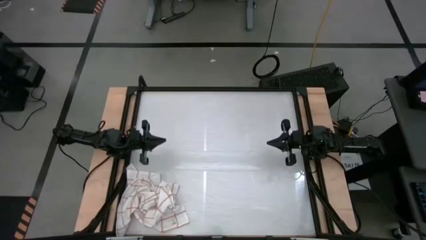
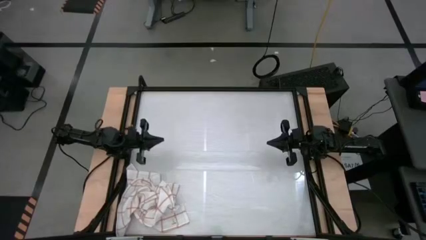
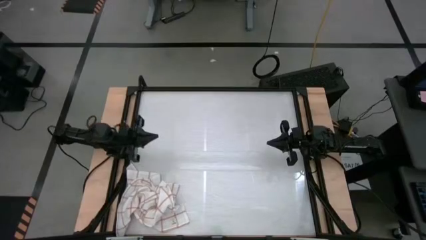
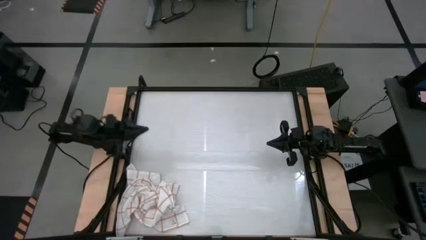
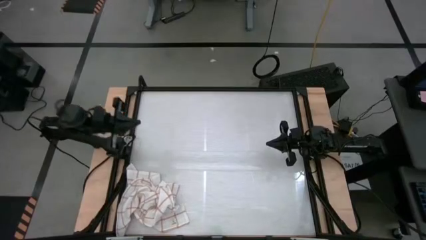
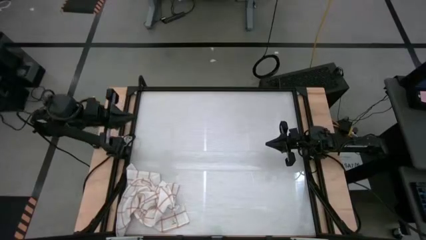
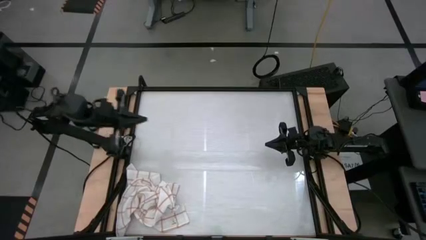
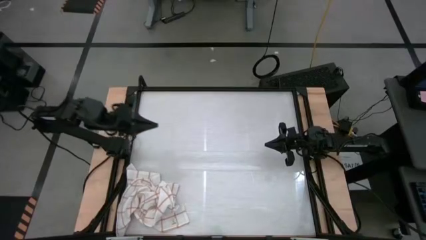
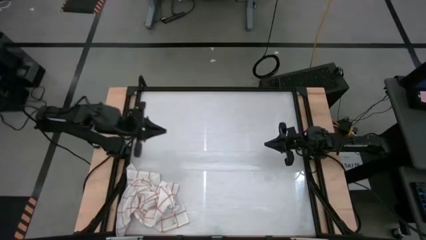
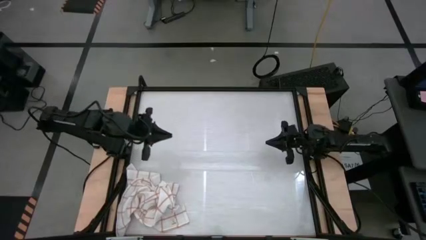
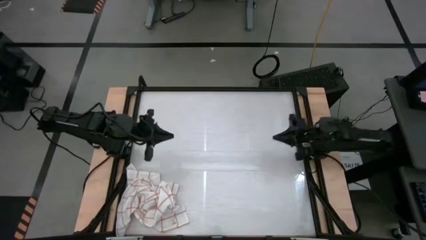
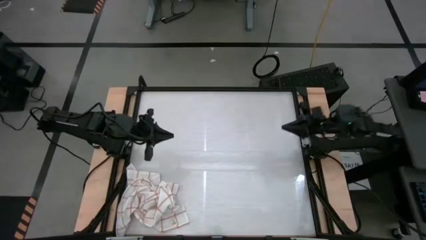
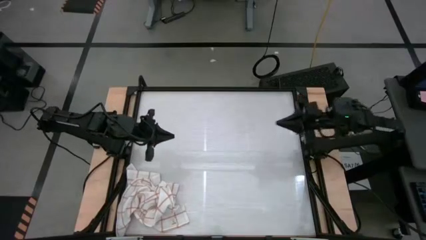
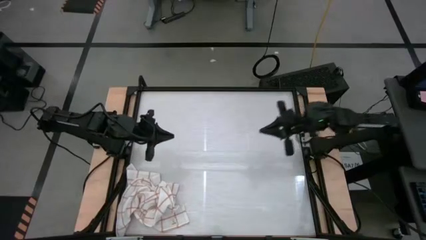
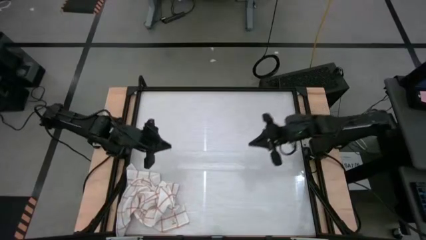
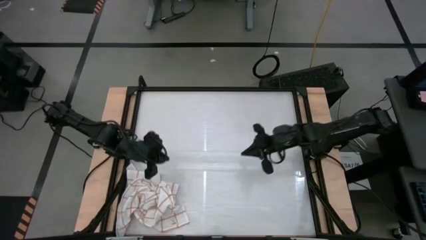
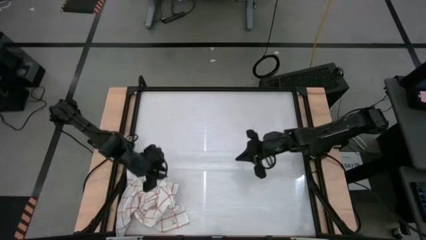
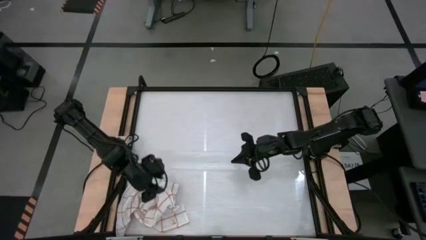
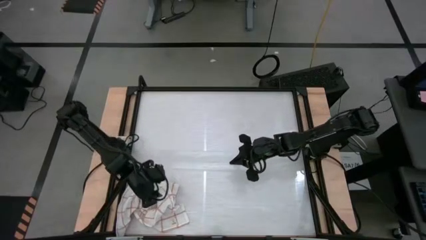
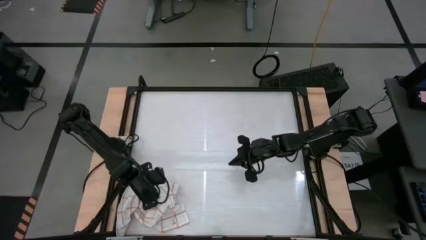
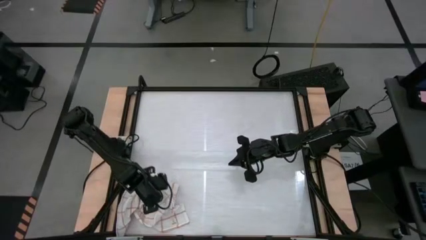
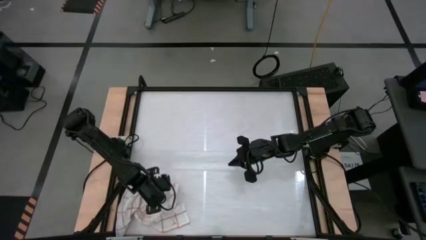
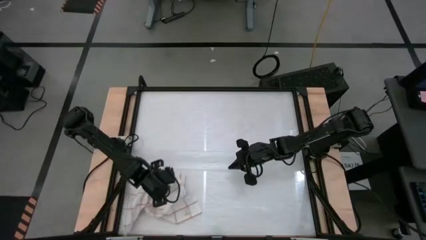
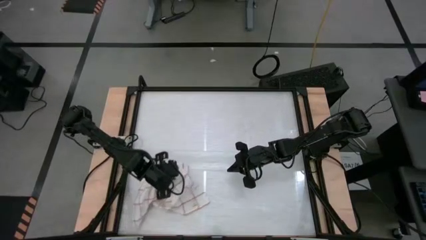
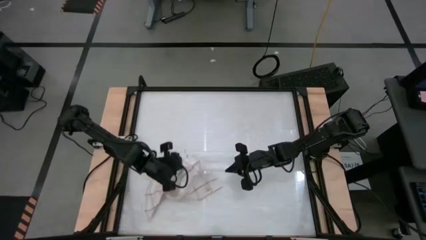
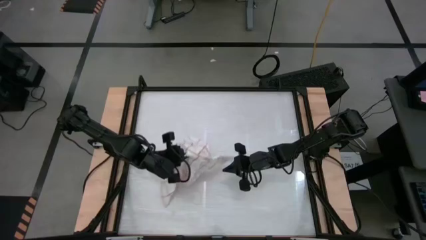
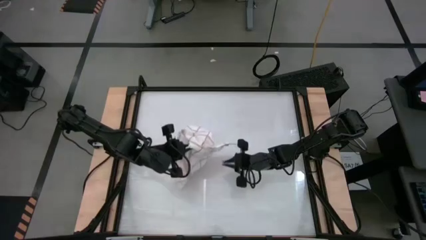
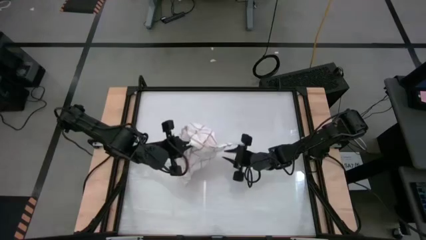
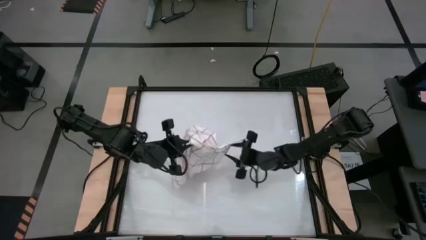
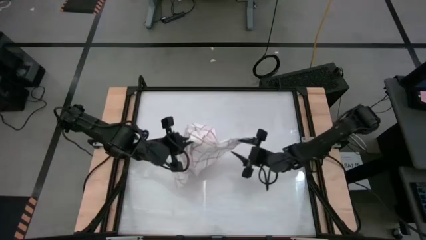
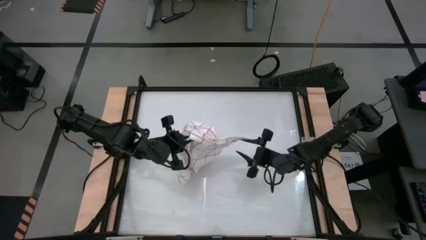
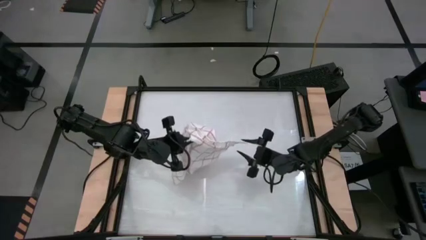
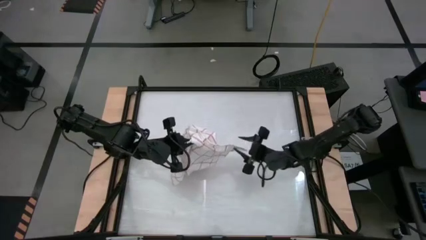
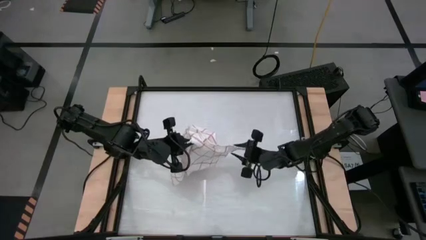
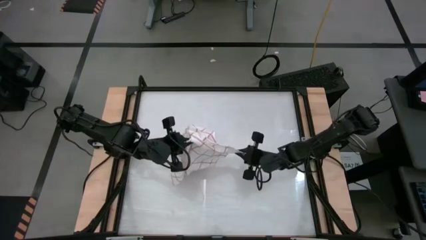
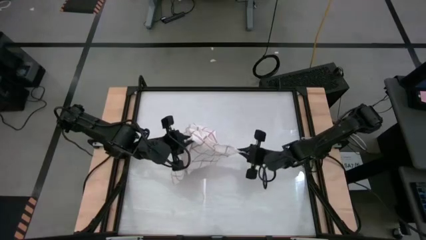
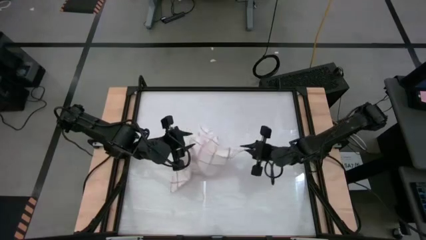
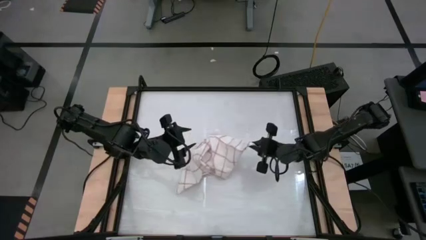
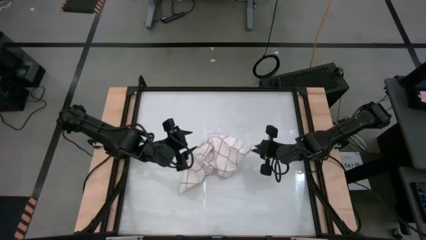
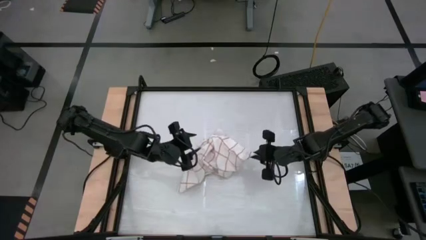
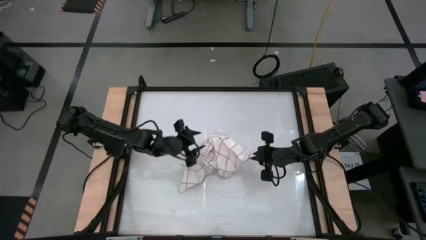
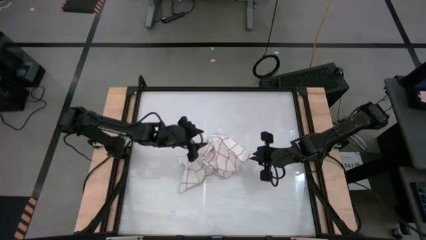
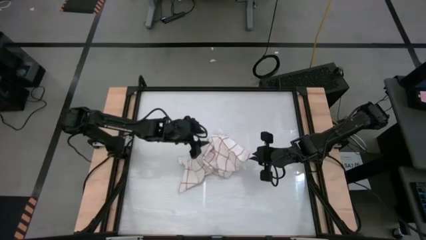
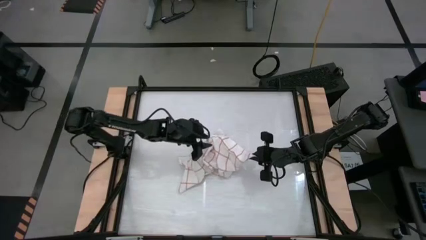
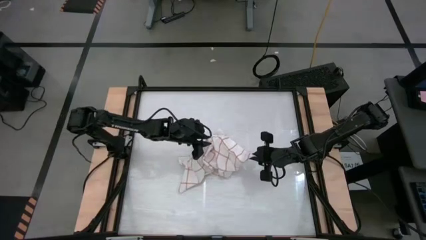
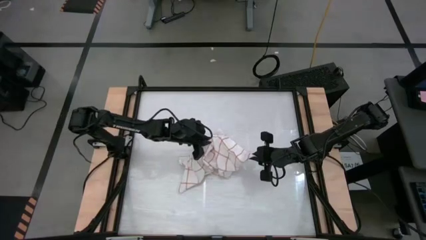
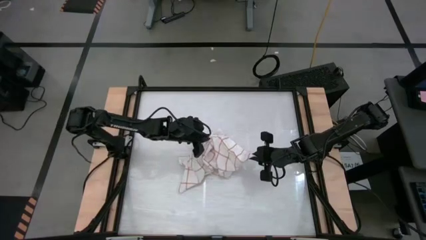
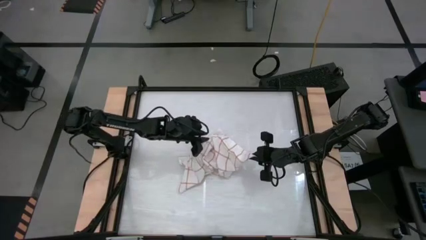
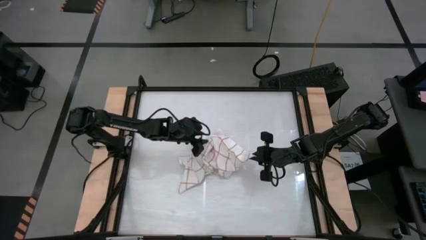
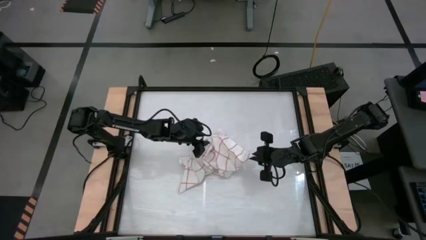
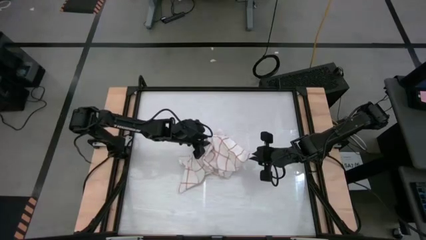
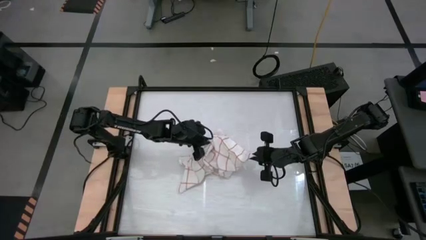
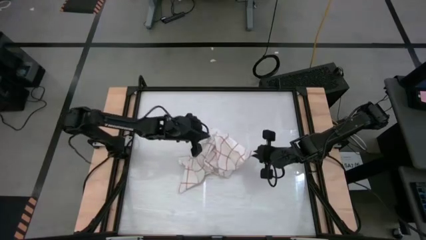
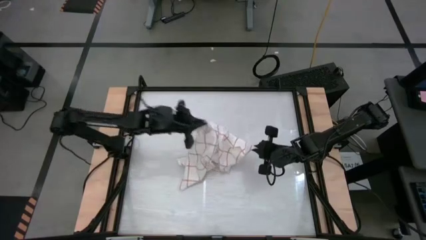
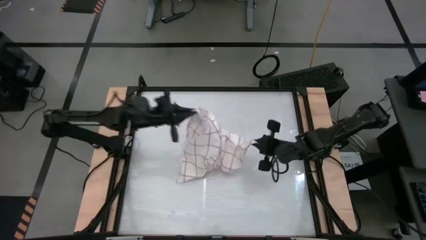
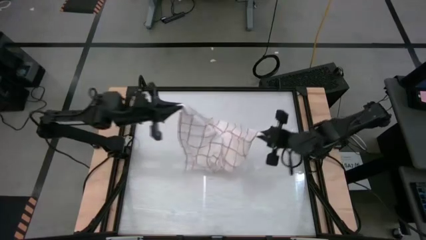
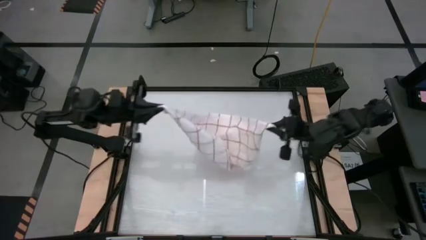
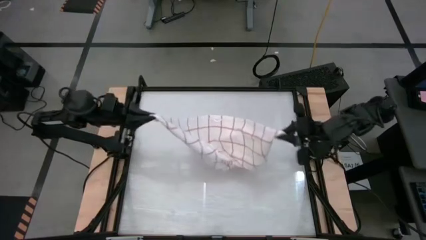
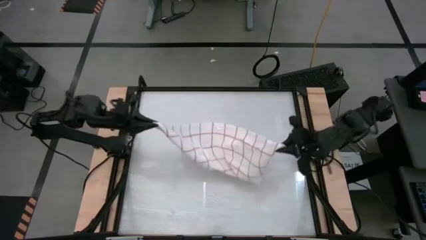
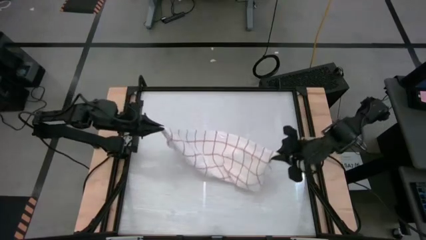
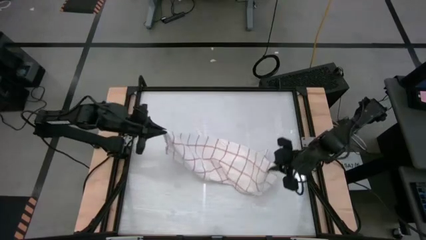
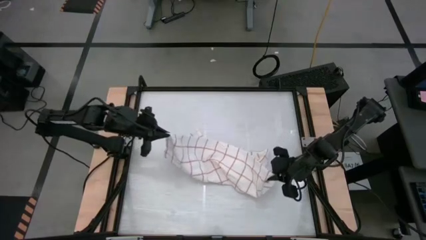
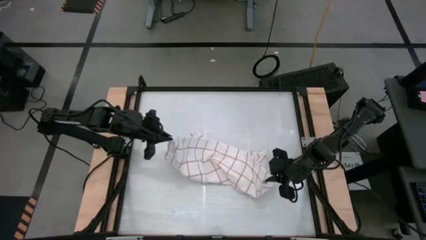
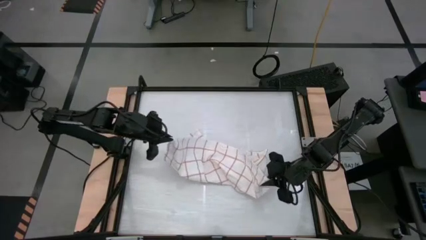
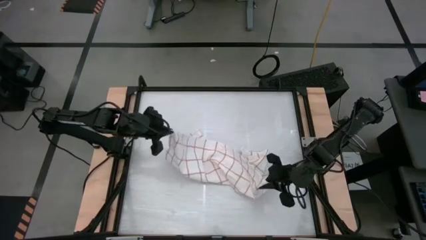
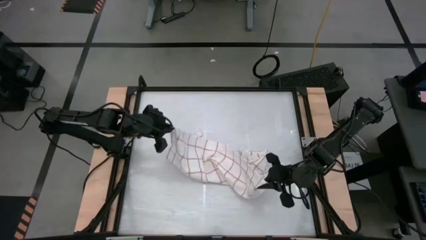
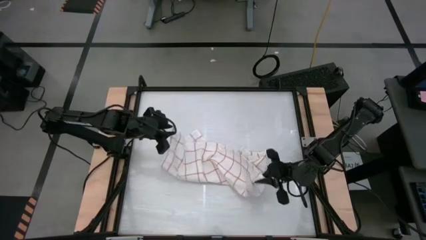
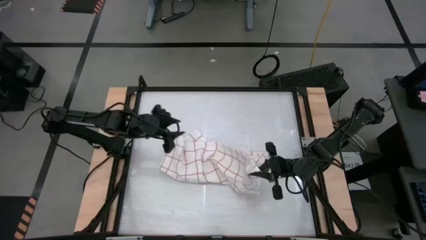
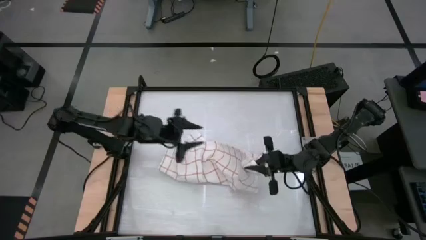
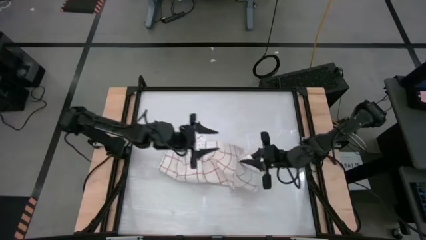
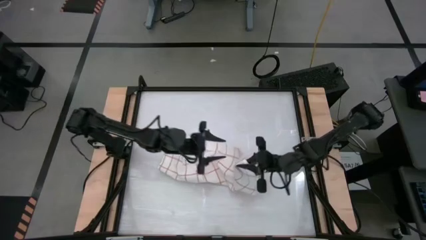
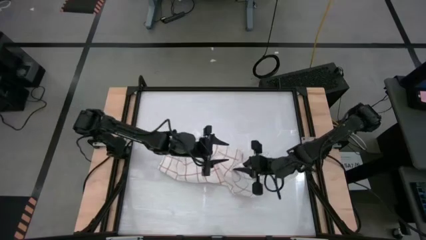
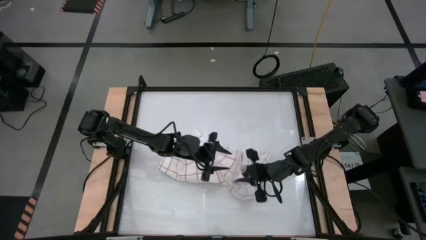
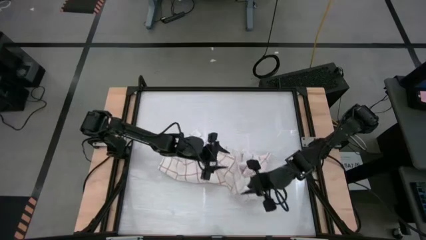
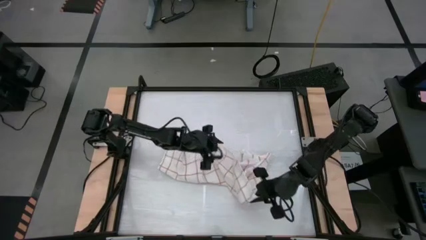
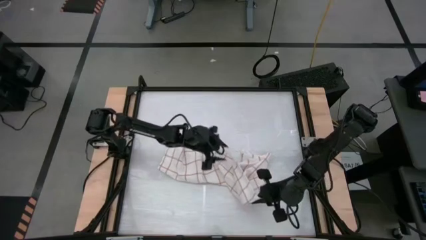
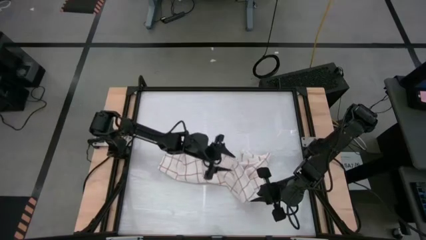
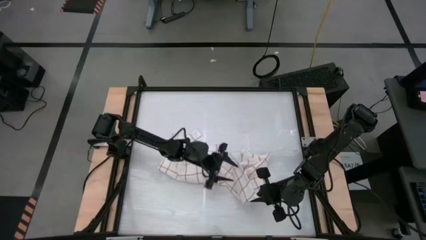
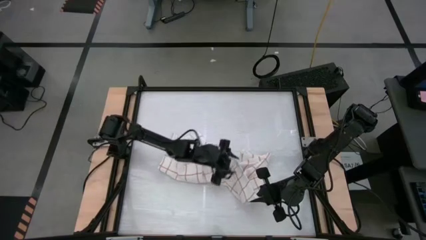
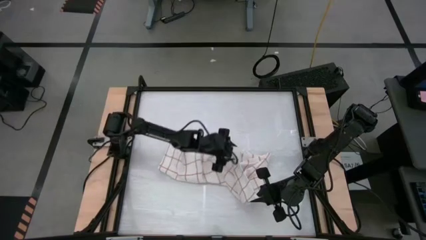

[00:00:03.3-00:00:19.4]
Task: Roll towel
Fold the white checkered towel
